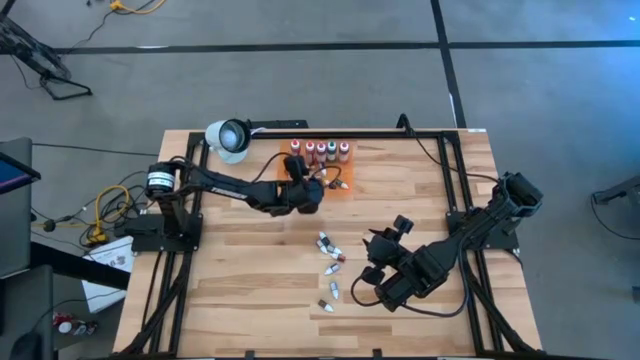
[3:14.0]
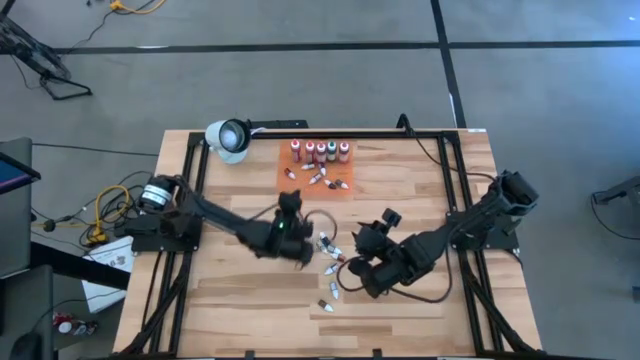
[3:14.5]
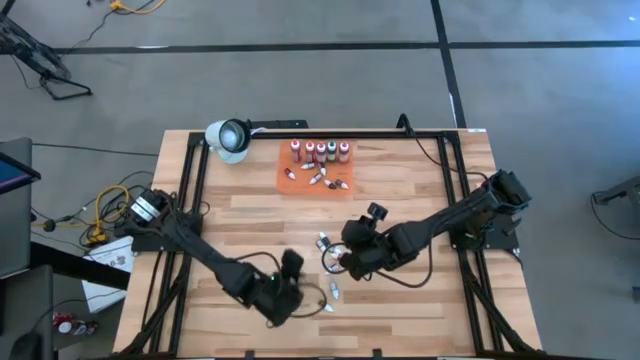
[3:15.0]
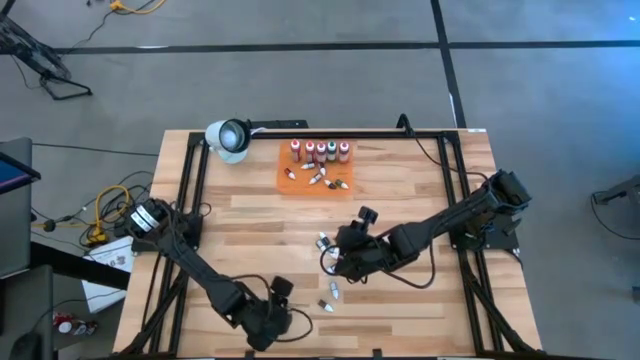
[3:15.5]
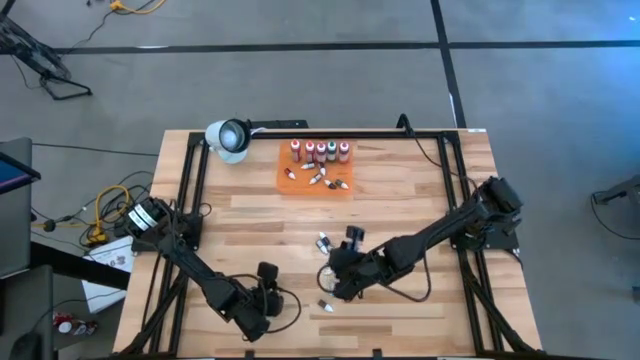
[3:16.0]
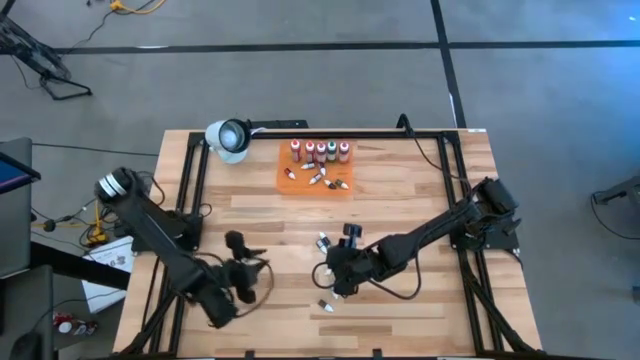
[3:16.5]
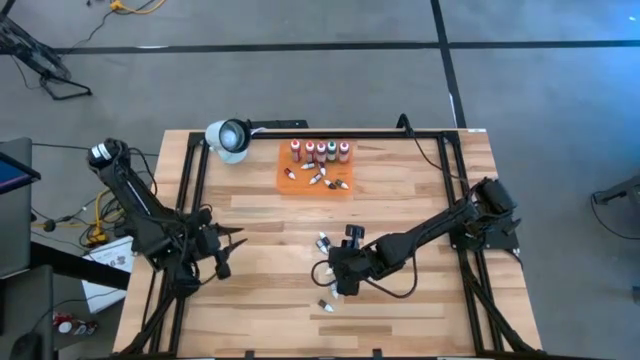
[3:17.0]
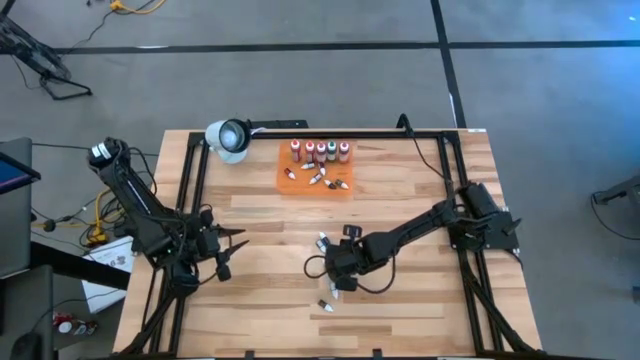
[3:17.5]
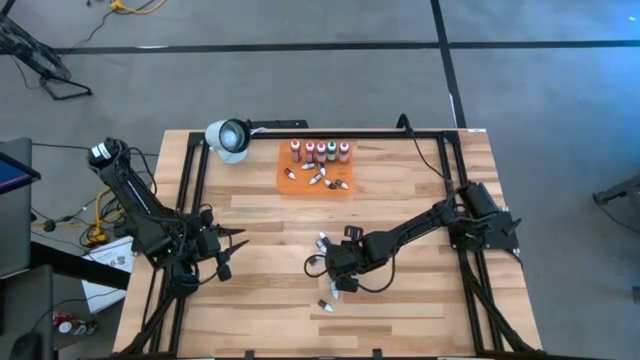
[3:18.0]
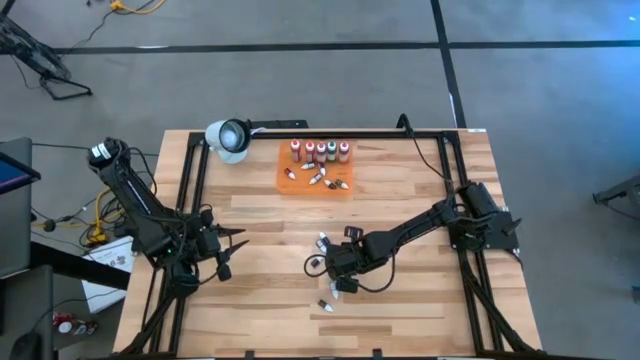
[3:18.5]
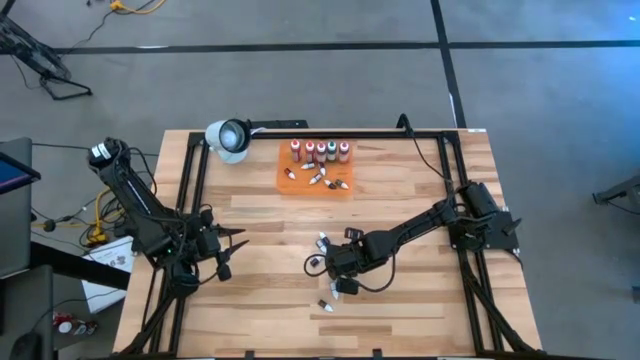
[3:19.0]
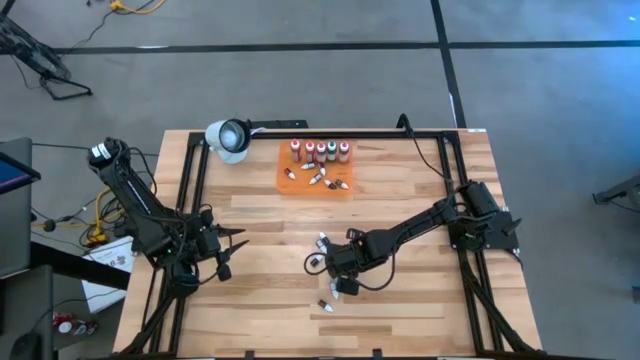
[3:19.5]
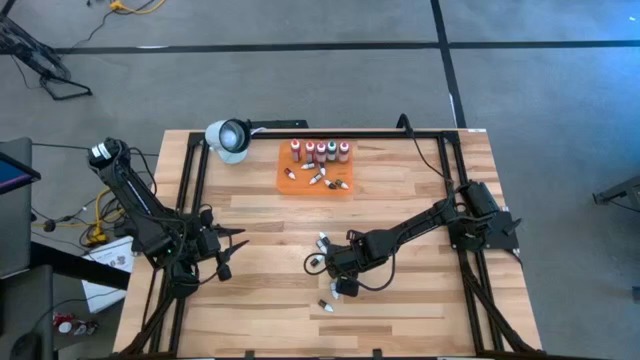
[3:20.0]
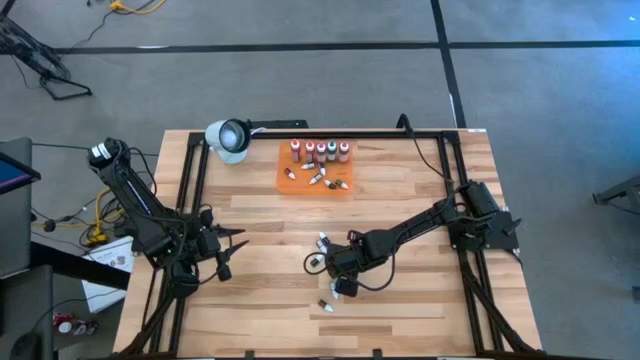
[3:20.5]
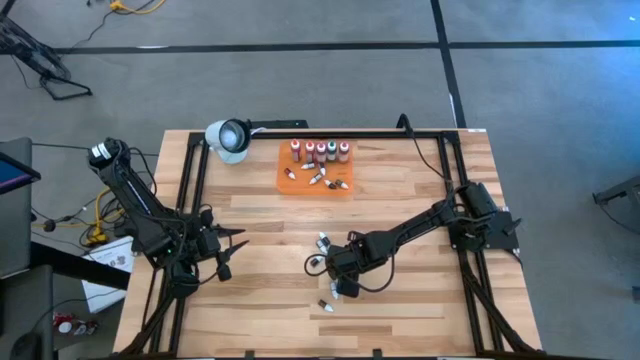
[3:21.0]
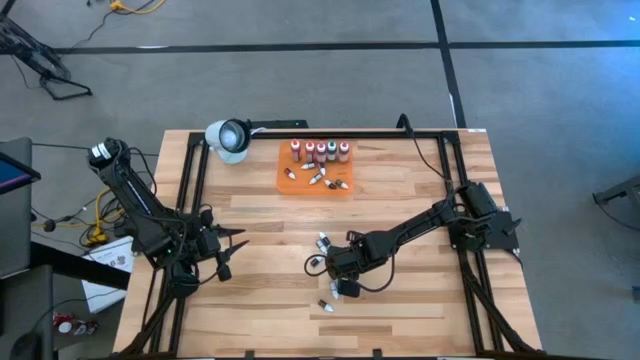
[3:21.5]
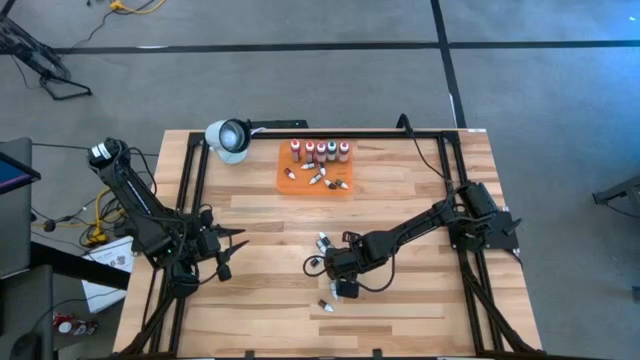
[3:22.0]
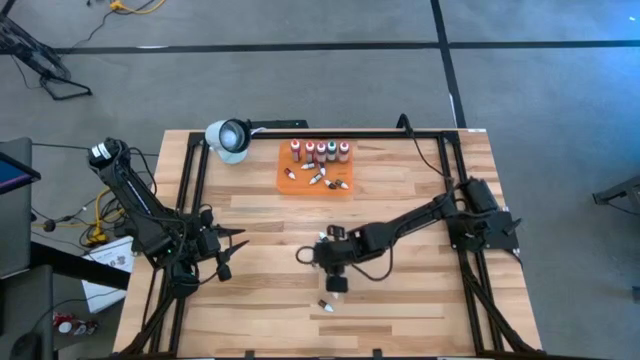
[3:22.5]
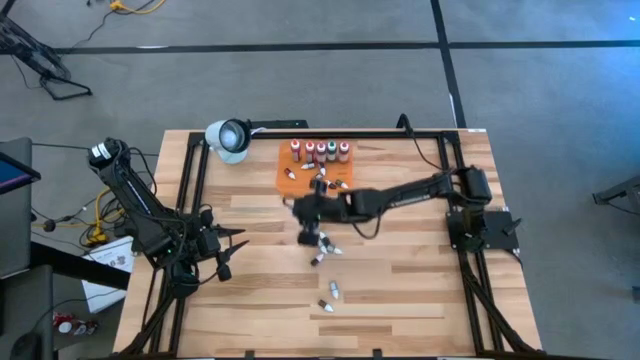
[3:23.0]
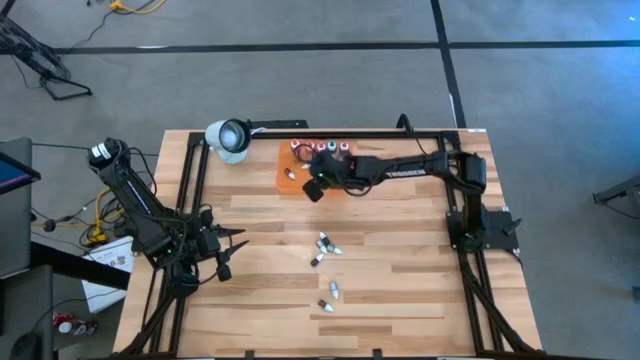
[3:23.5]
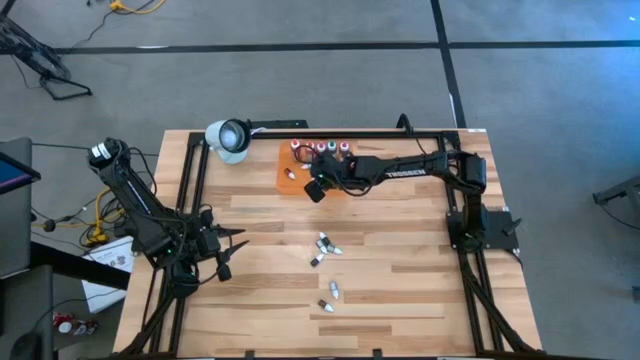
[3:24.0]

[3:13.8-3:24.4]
Task: Pick & Place food coloring
Put the small yellow food coloring bottle into the orange bin

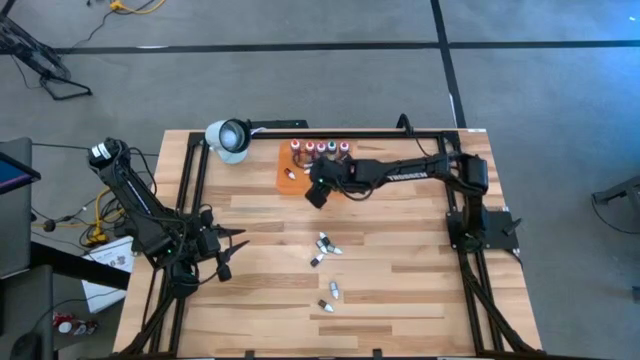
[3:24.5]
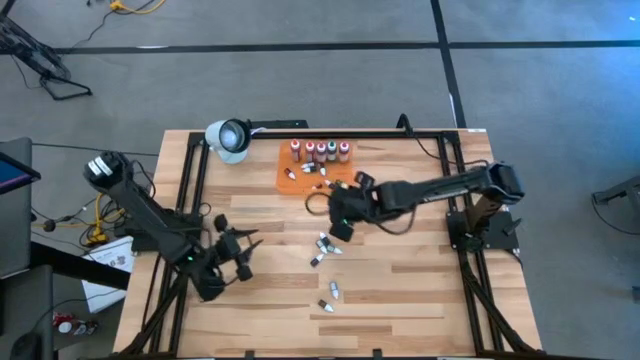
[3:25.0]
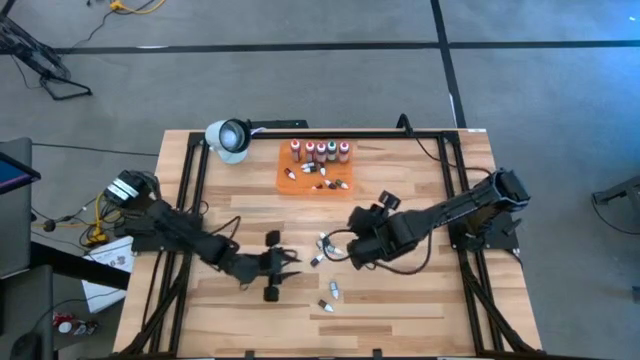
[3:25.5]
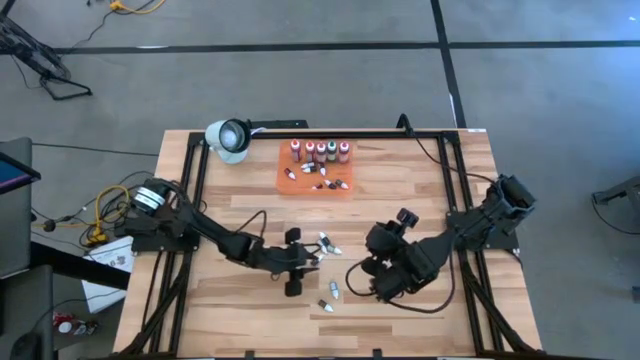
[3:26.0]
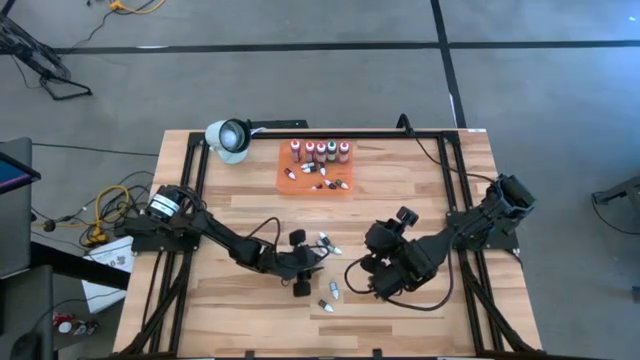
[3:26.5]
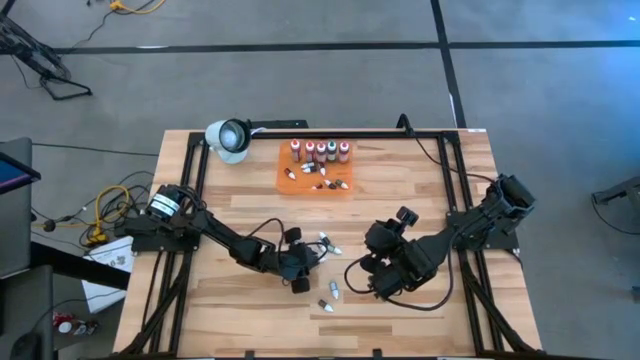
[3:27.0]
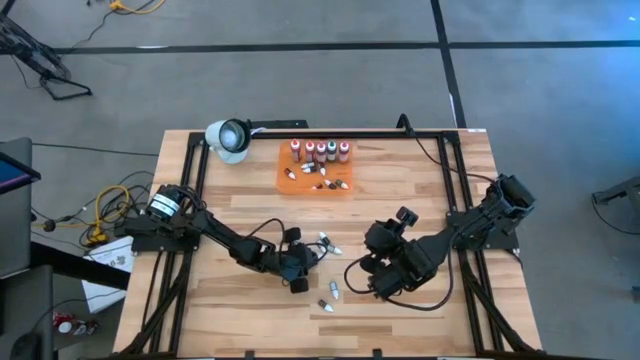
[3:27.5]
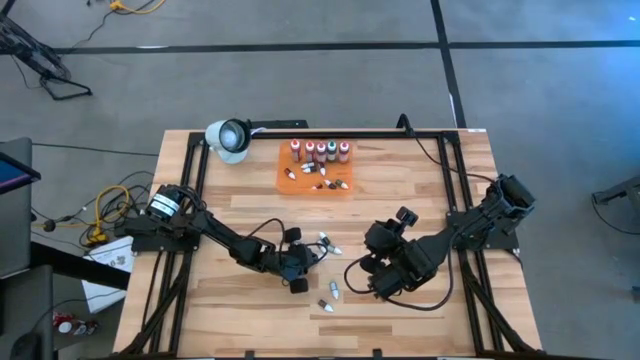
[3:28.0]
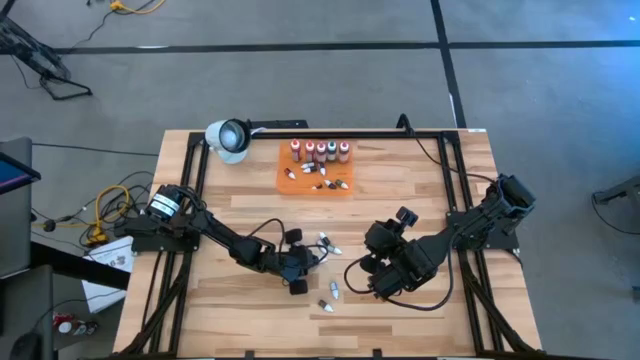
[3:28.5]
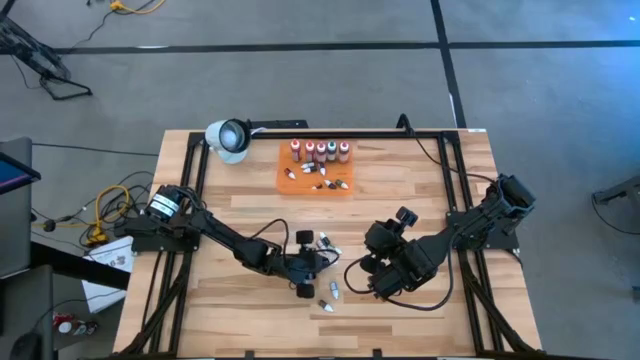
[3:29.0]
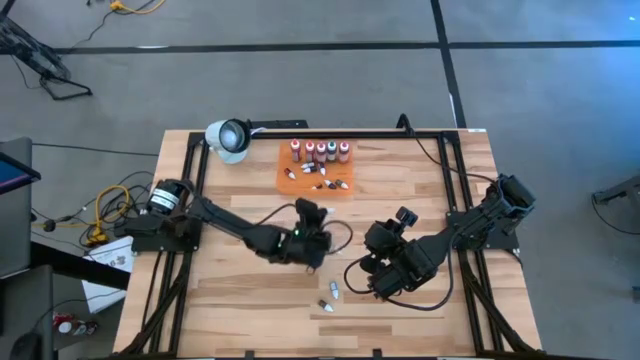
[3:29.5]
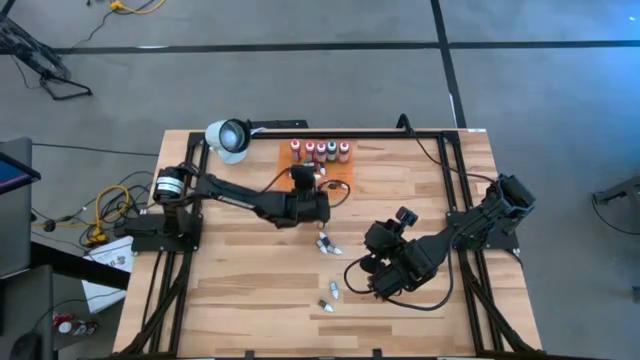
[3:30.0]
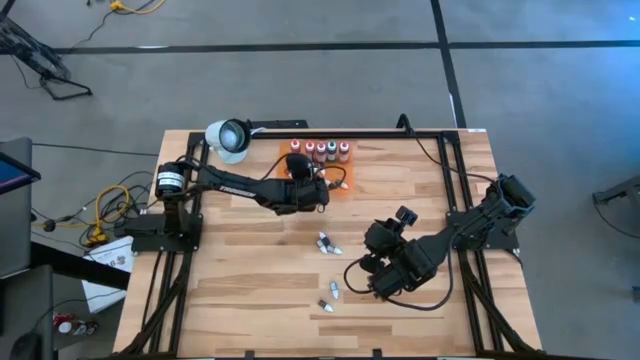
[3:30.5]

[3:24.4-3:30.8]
Put the small pink food coloring bottle into the orange bin

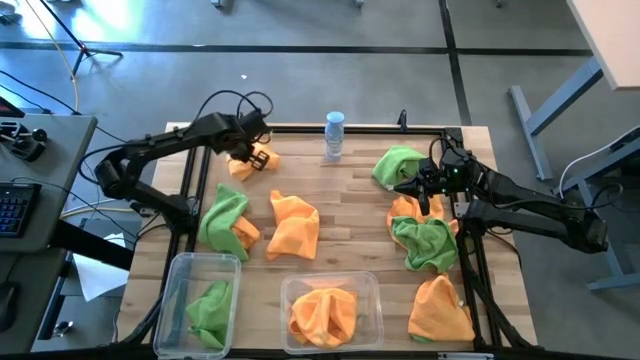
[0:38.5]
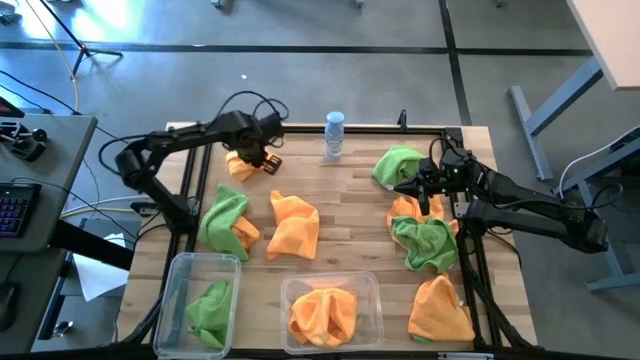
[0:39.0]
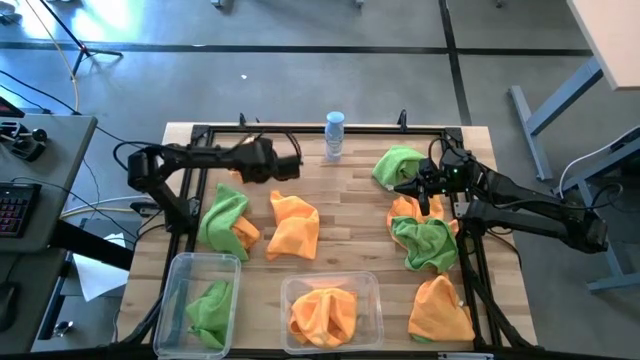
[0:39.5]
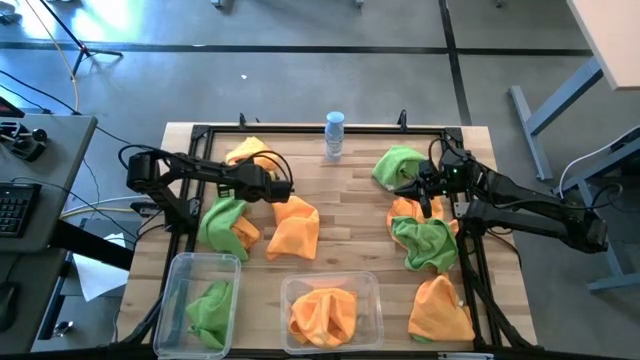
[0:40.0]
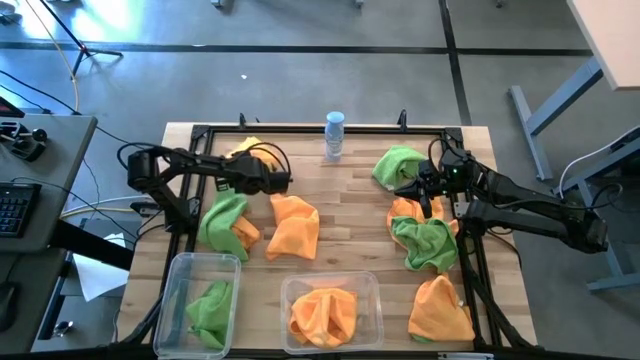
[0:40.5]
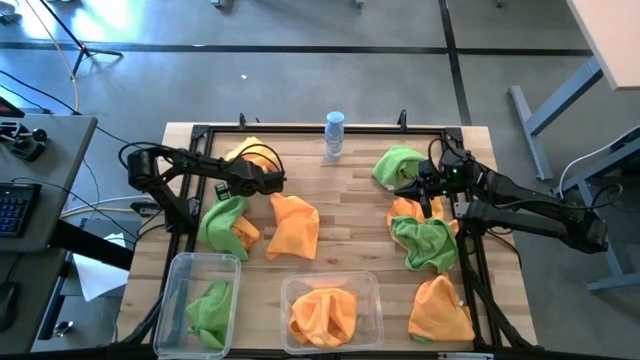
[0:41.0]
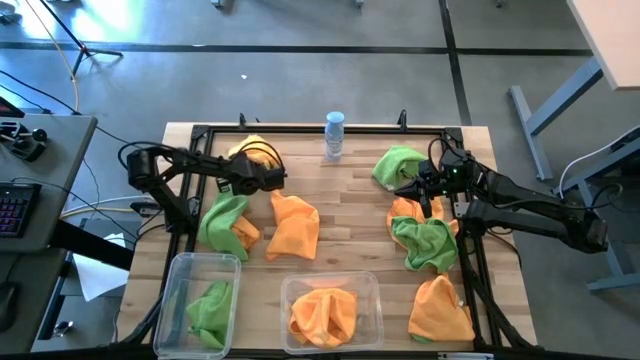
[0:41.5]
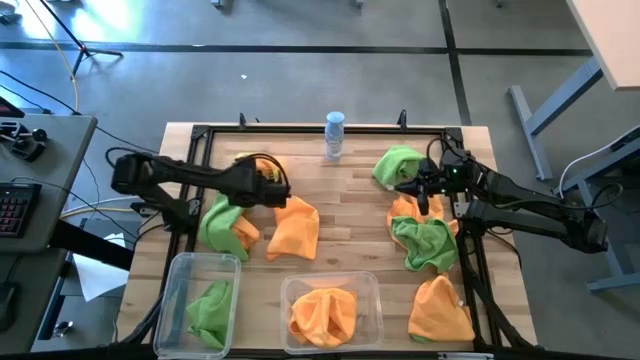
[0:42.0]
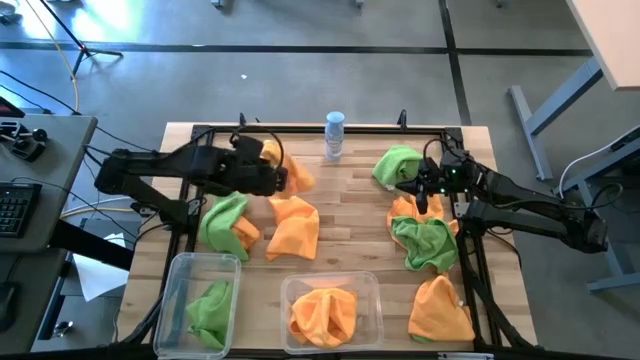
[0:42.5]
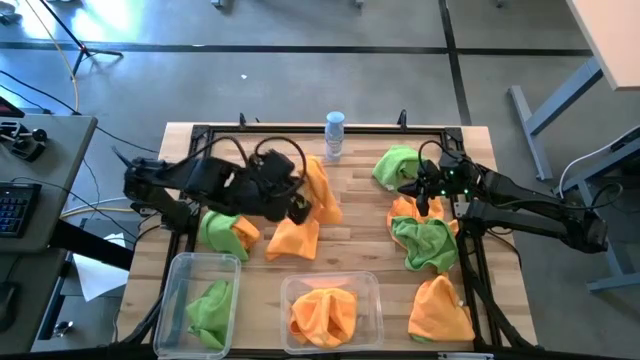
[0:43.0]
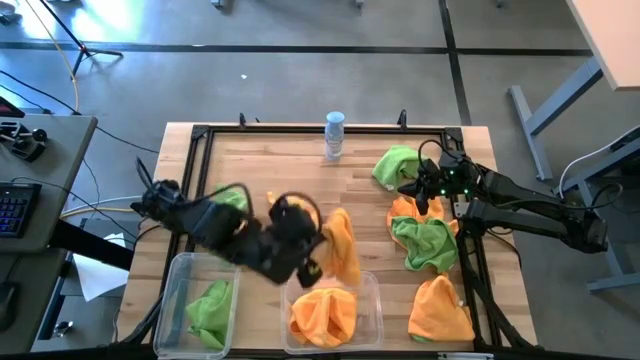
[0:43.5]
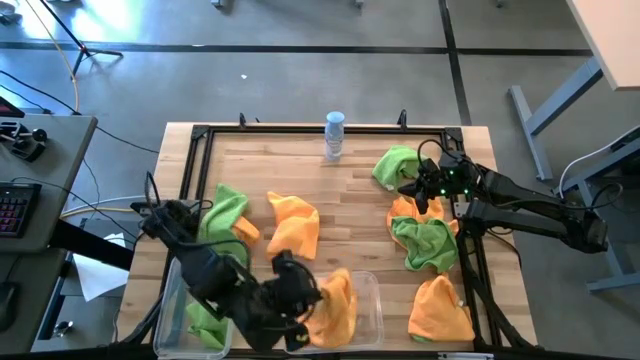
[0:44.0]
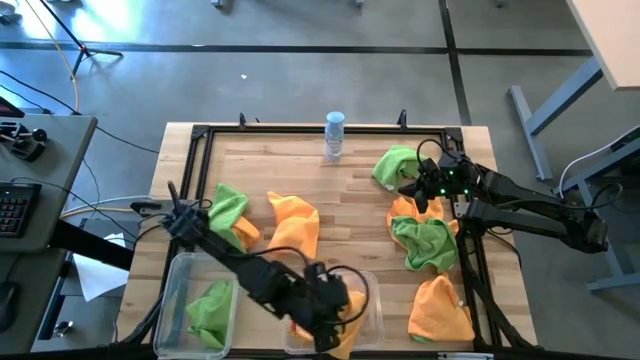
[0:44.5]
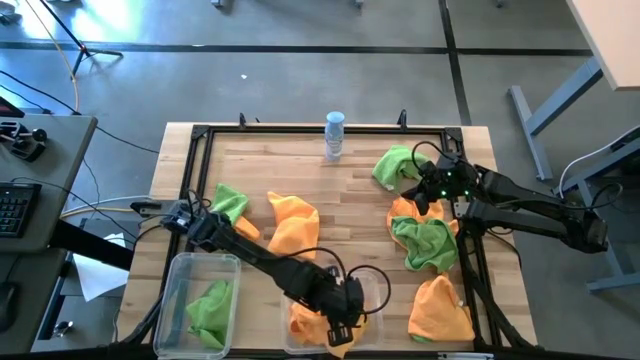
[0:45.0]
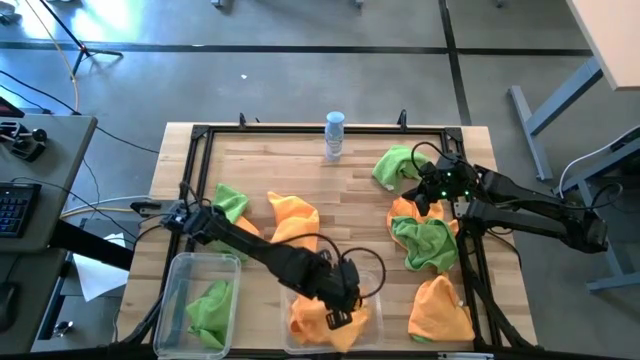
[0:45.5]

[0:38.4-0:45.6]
Task: Sort microfiber towel by color & place in baskets
Put the orange microfiber towel into the right transparent bin
